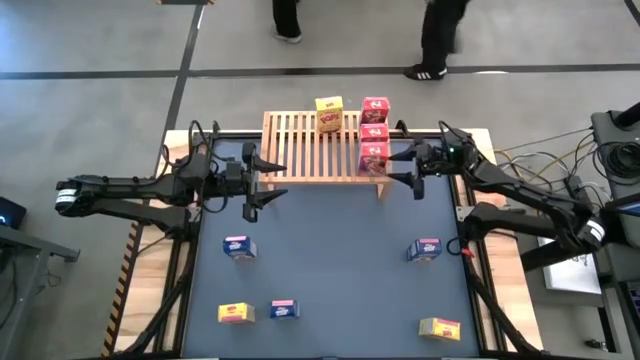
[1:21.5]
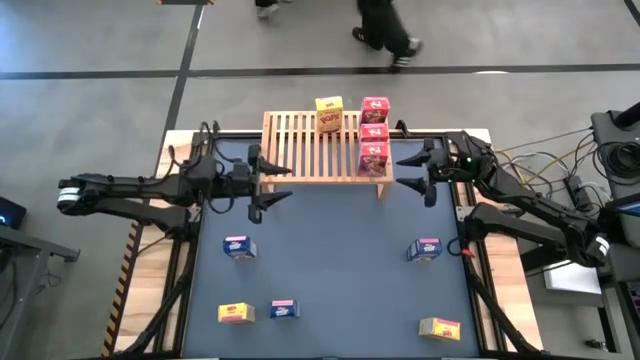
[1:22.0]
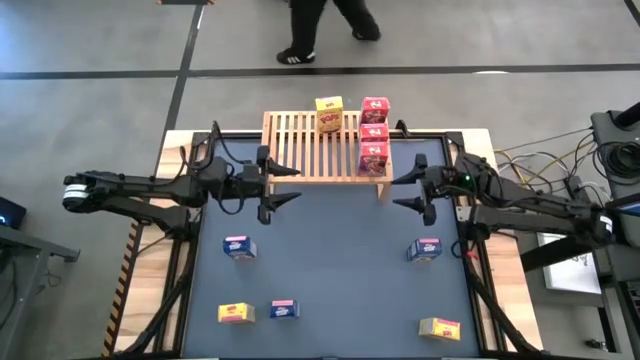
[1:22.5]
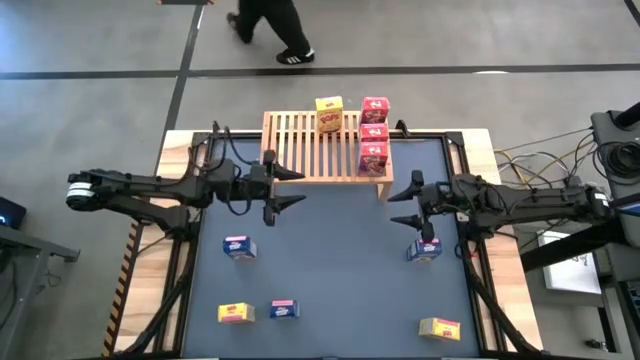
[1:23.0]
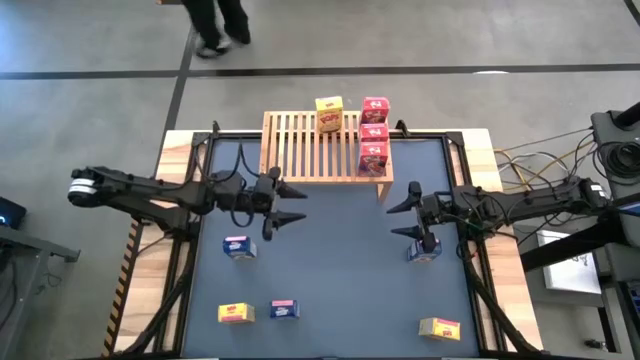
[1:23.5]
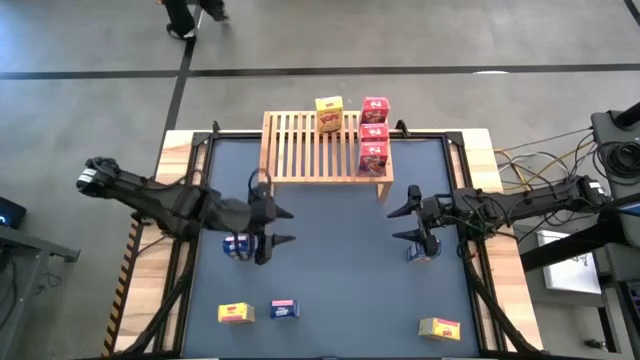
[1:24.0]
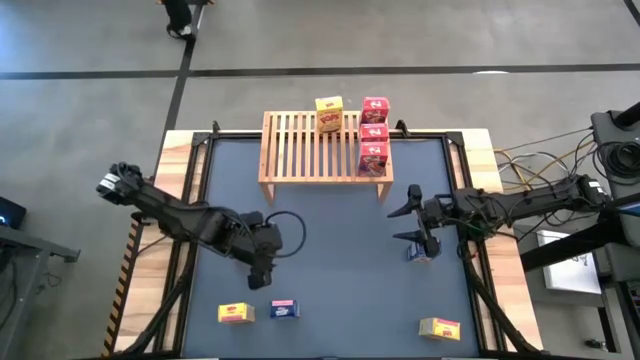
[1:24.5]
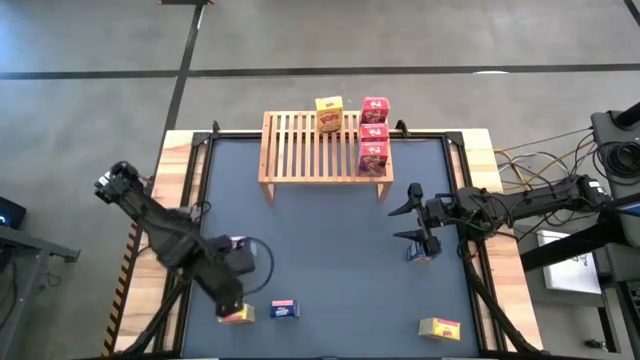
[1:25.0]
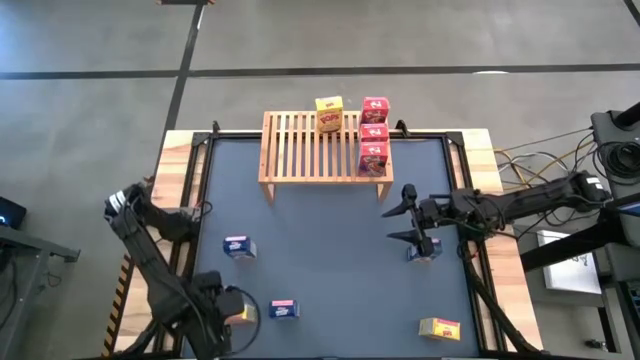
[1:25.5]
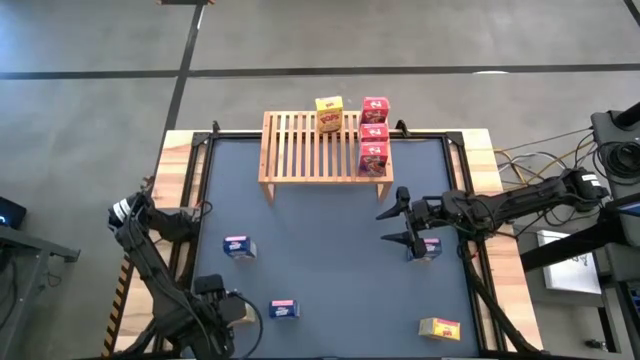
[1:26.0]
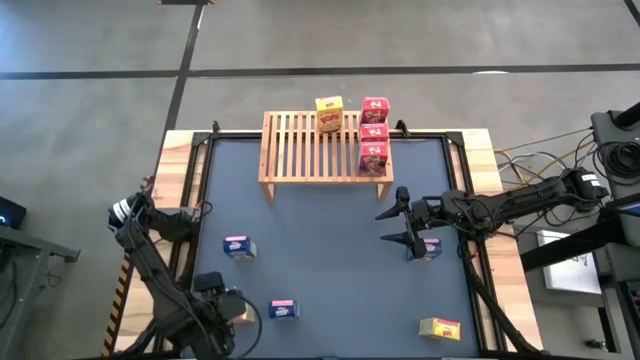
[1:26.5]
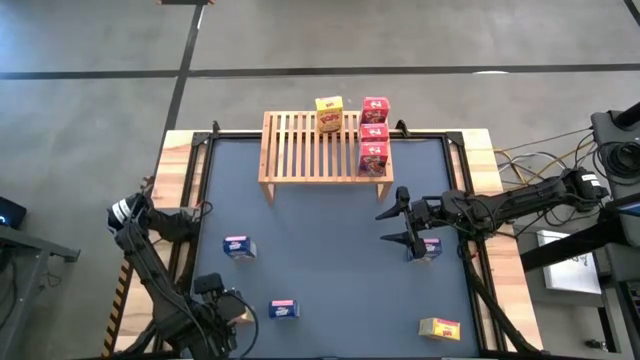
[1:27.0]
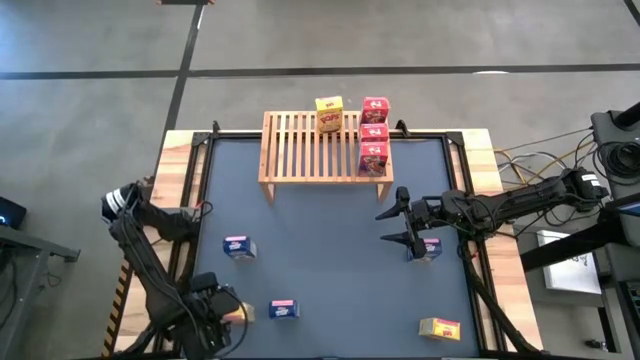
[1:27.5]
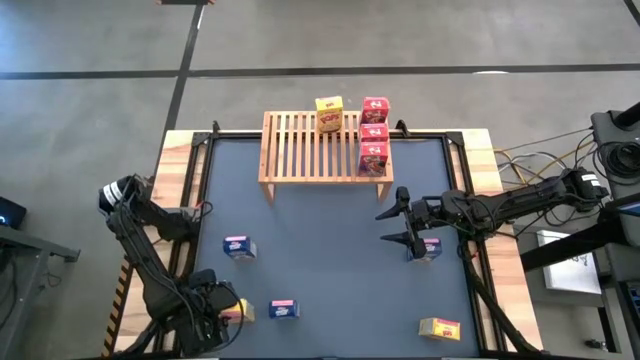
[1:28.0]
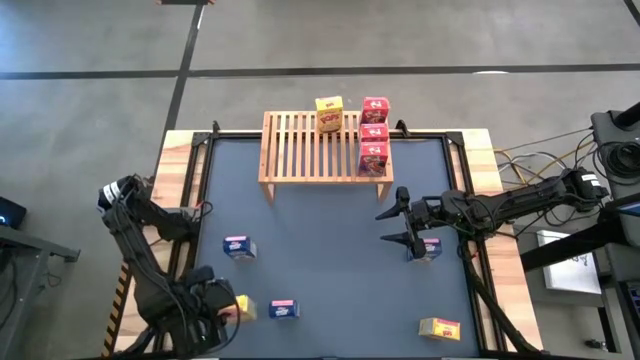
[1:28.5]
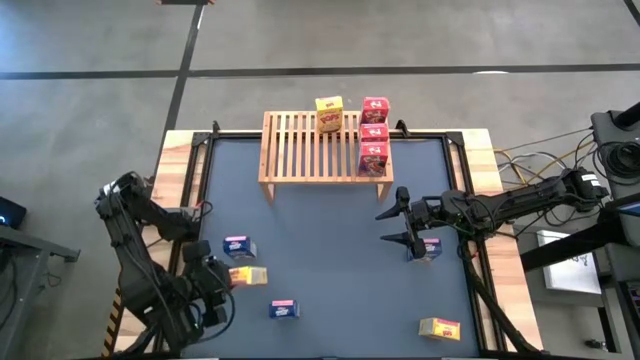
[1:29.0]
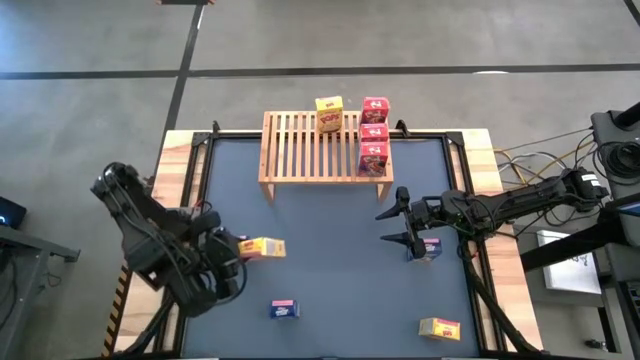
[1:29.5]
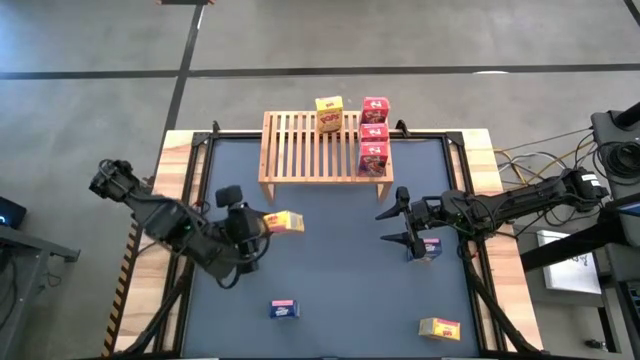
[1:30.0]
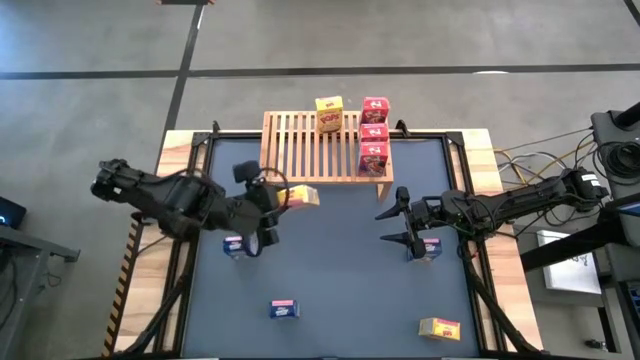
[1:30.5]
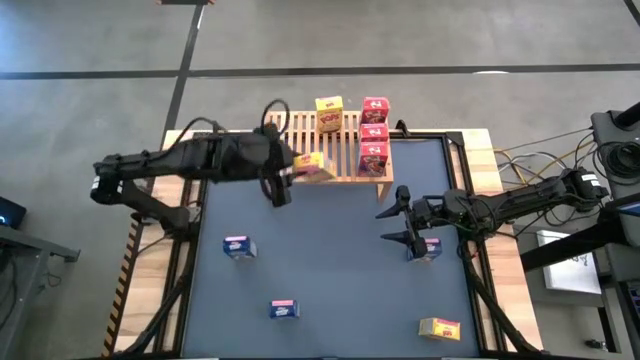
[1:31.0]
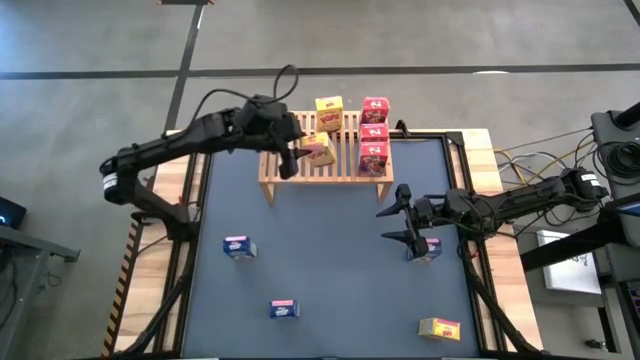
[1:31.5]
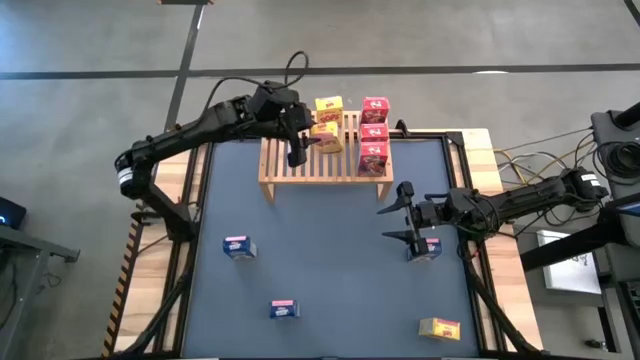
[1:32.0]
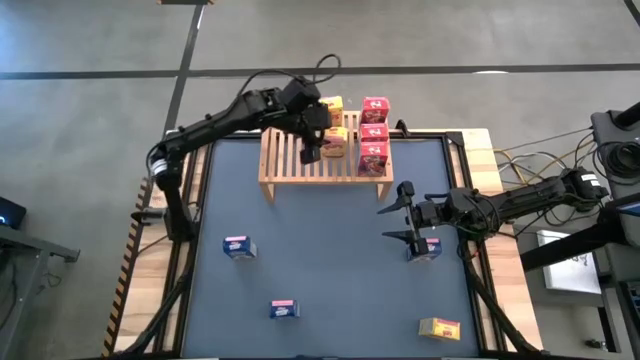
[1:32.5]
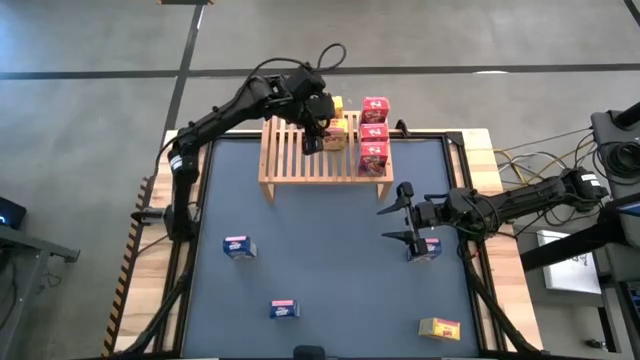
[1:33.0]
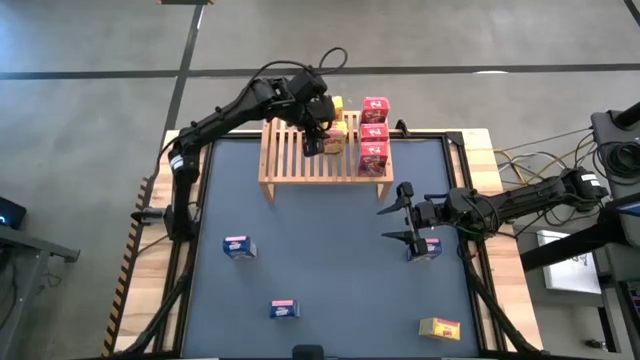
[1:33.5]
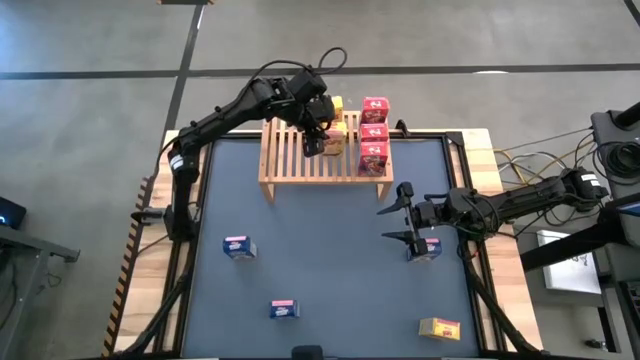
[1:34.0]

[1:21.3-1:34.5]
Task: Stack cereal on shelf
Put the left yellow cereal box on the shelf aligned with the other yellow cereal box

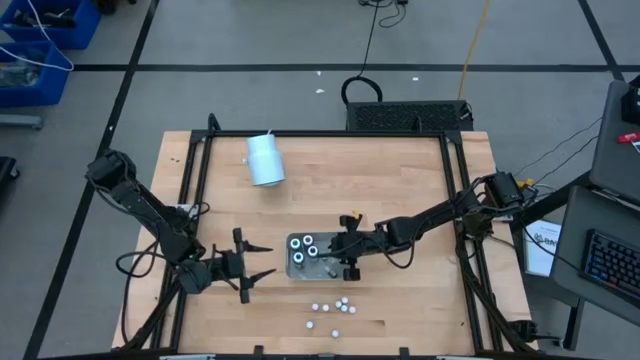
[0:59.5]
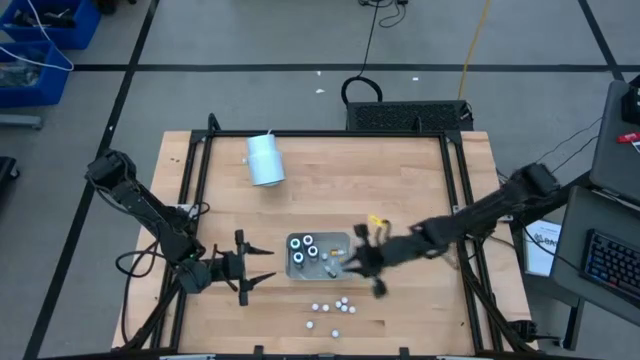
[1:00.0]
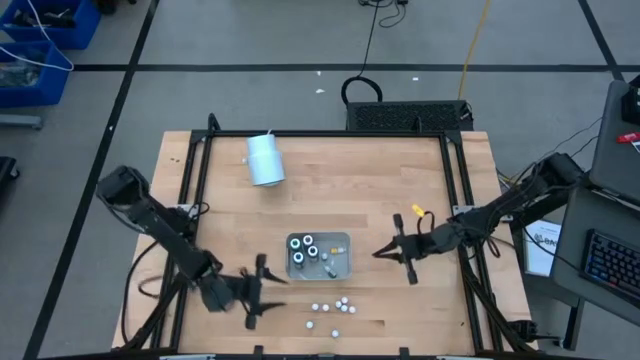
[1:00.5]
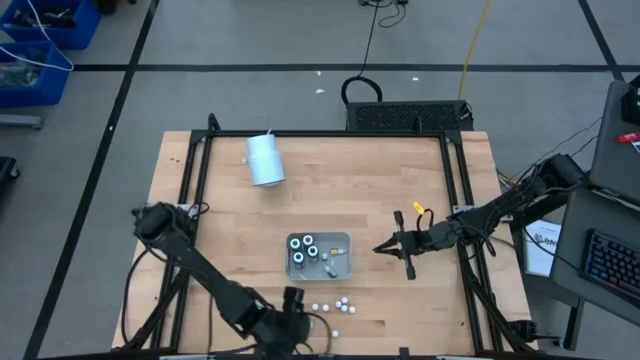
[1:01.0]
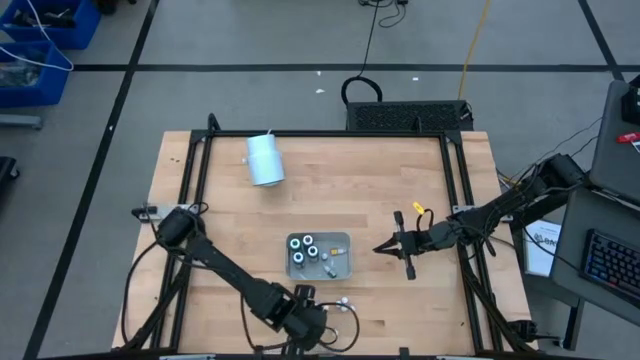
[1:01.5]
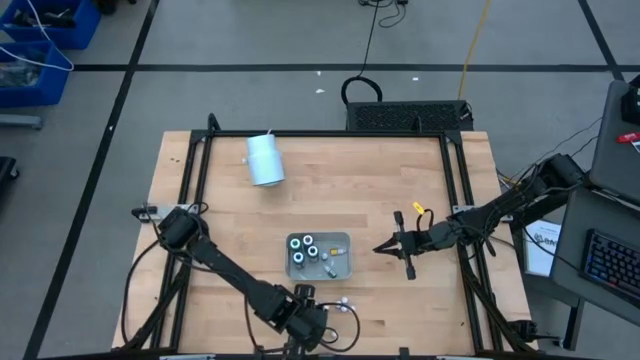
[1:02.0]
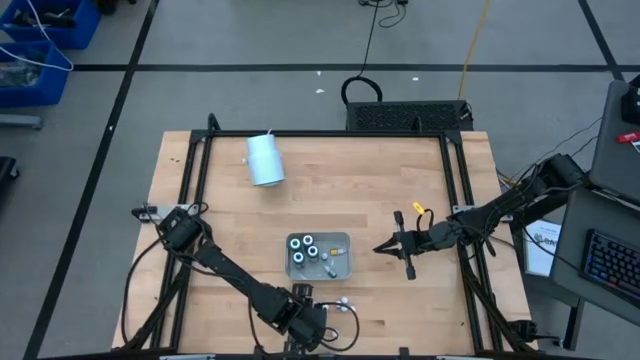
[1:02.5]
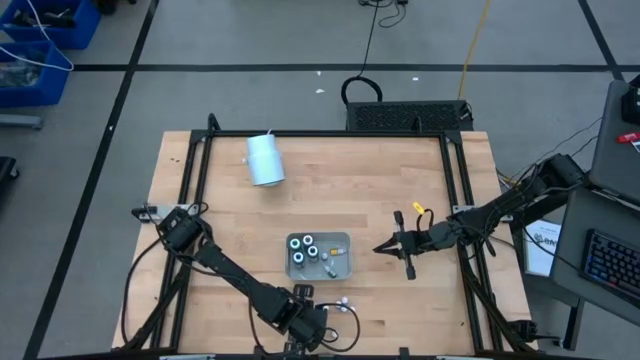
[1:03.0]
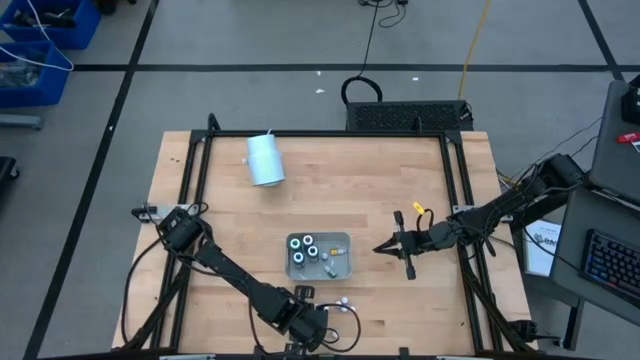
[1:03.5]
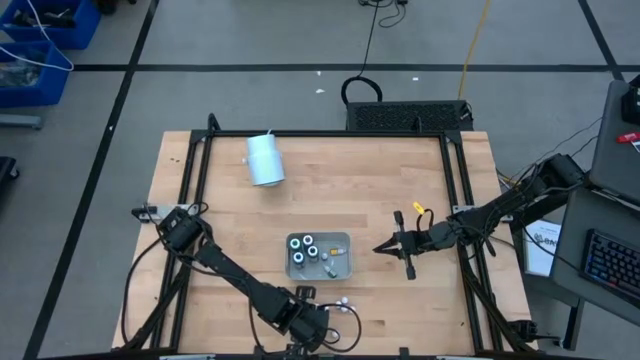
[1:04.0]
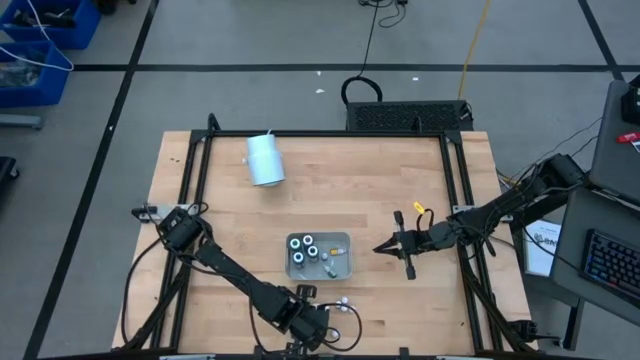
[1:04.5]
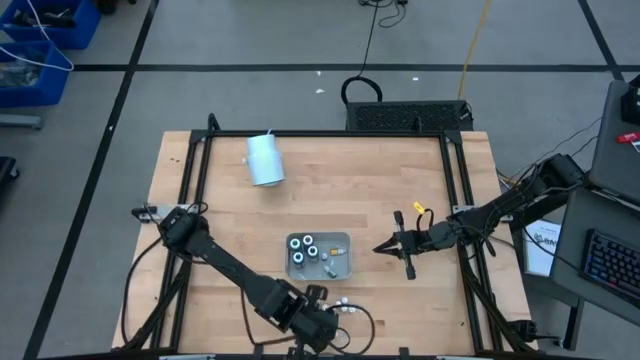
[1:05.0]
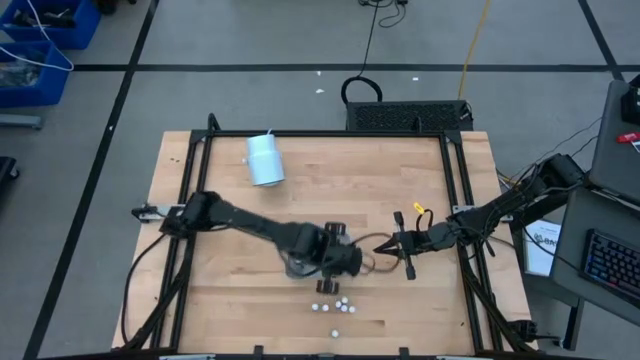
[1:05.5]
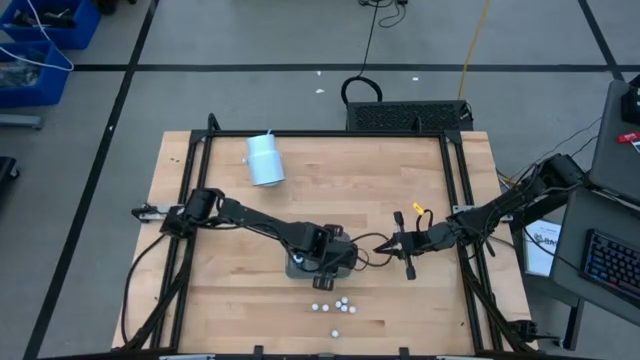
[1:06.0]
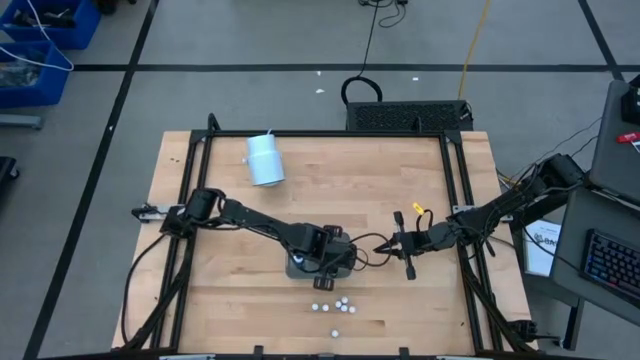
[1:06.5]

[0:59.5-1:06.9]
Task: Pick & Place food coloring
Put the small black food coloring bottle into the gray bin

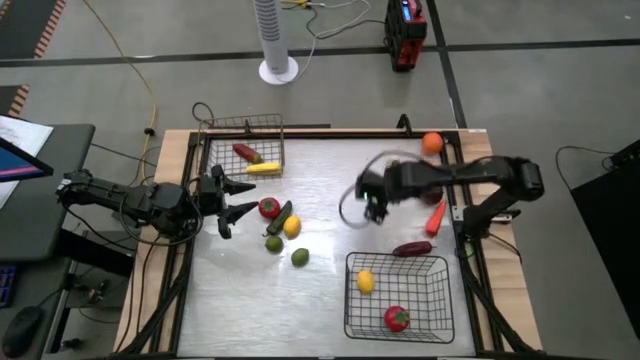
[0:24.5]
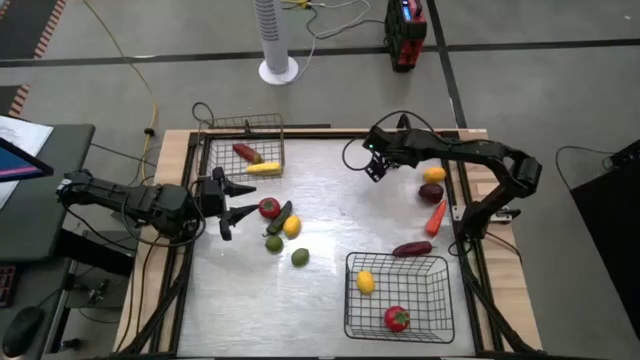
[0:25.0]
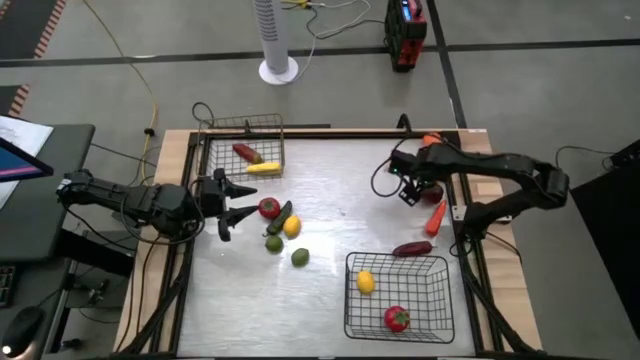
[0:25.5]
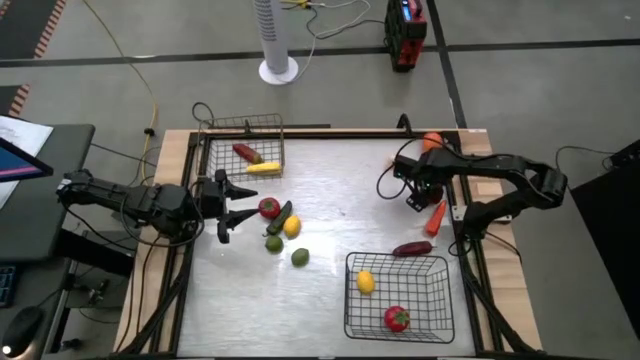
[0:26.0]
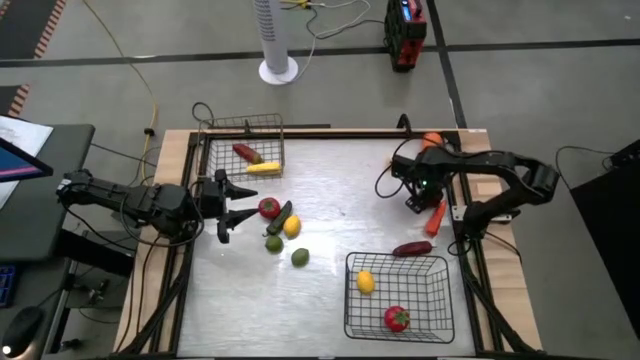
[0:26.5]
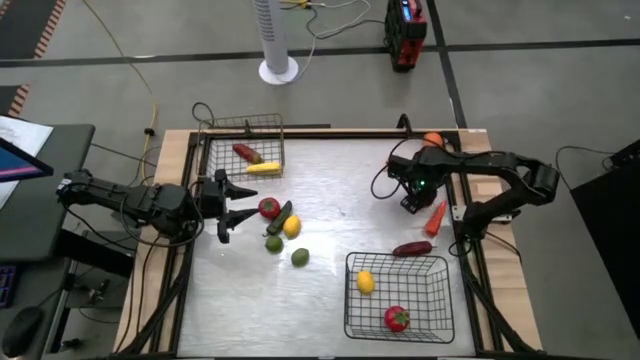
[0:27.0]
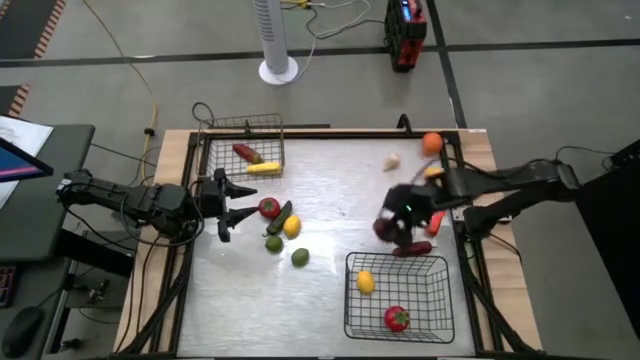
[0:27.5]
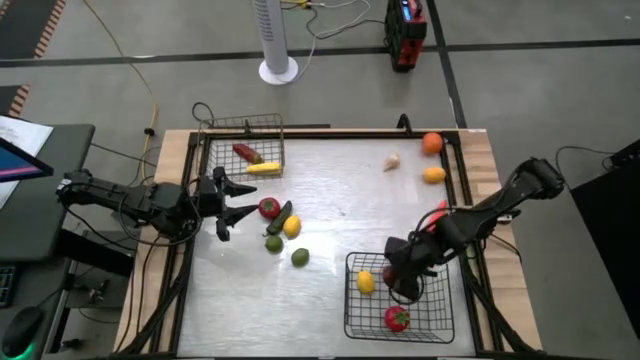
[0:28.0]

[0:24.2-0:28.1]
Task: Sort produce into baskets
Put the apple into the bottom wire basket
